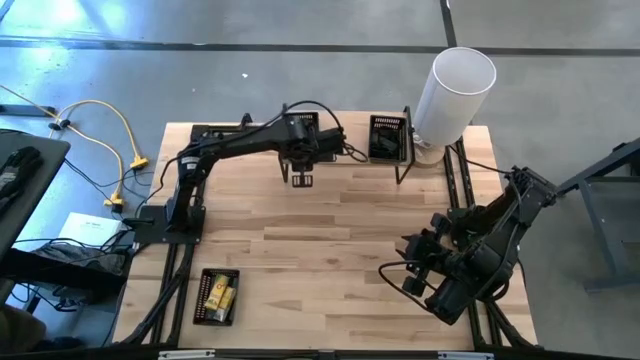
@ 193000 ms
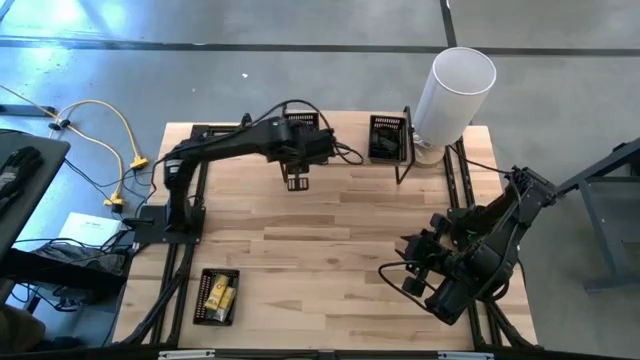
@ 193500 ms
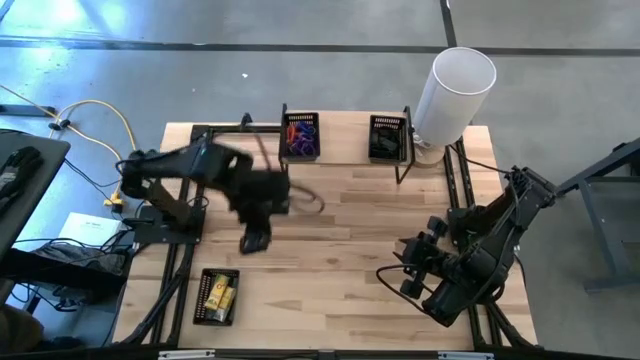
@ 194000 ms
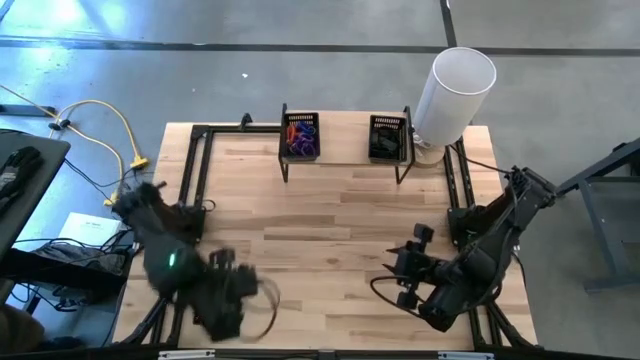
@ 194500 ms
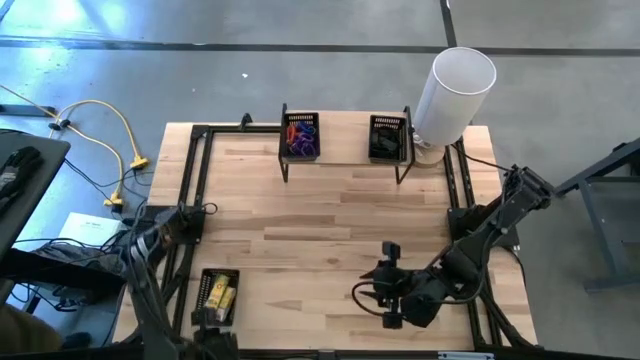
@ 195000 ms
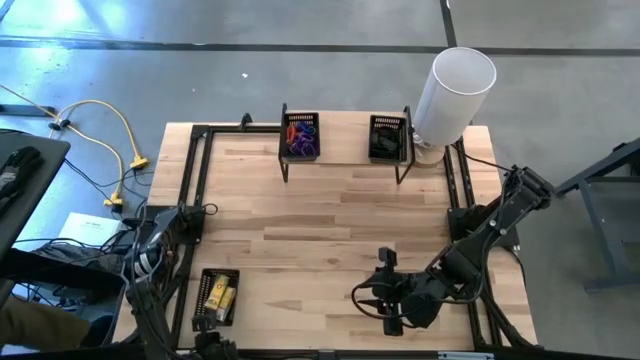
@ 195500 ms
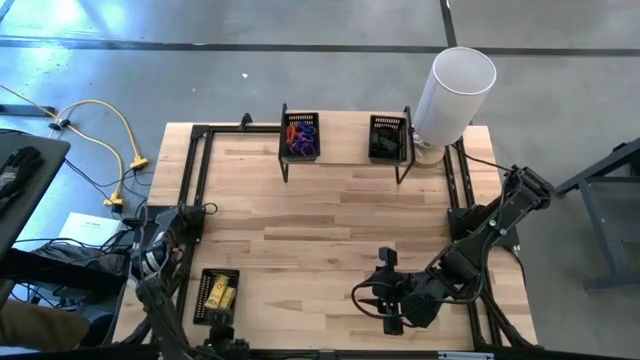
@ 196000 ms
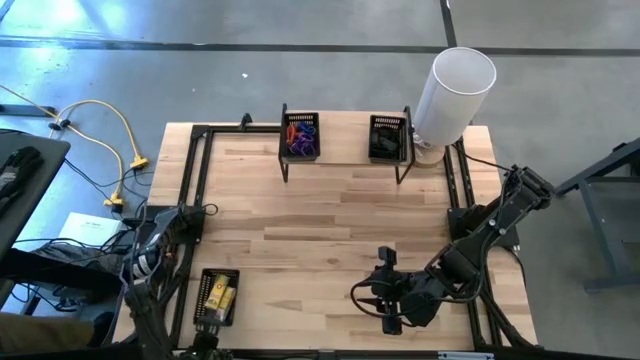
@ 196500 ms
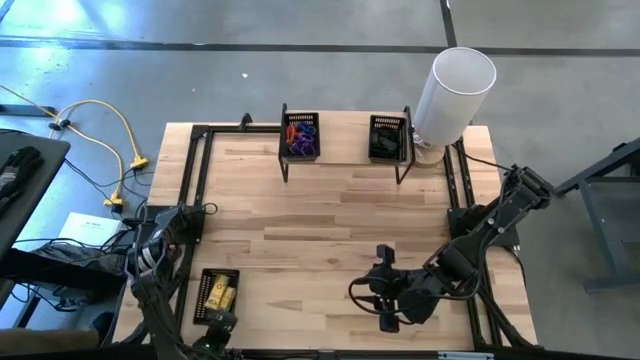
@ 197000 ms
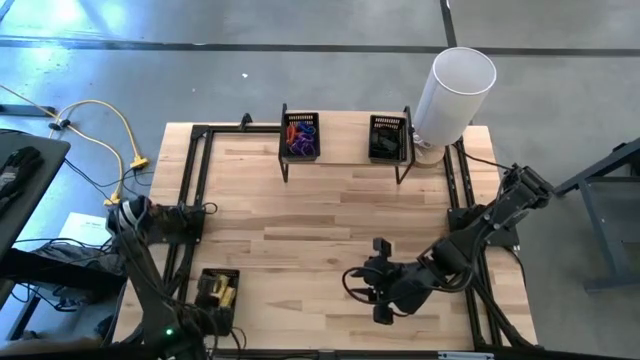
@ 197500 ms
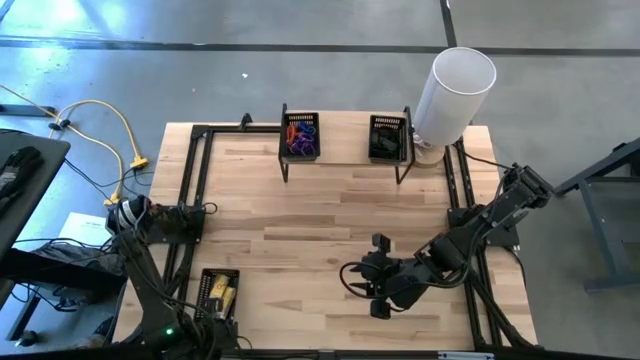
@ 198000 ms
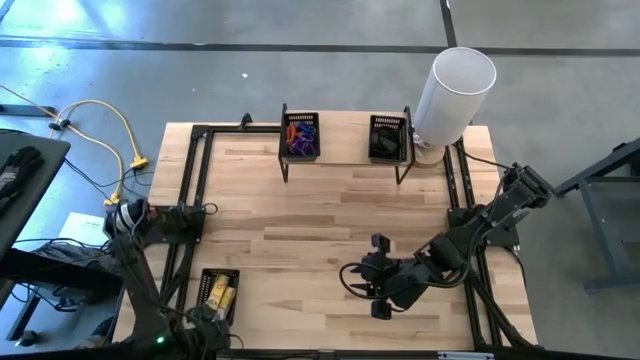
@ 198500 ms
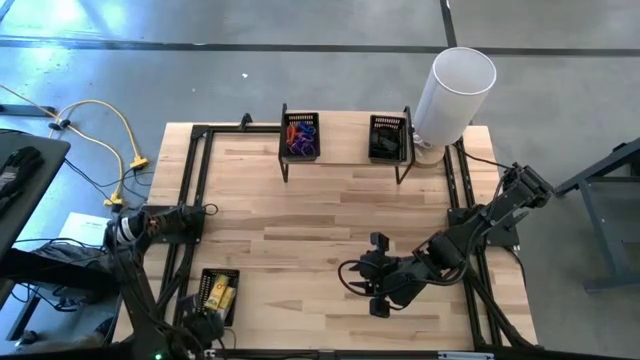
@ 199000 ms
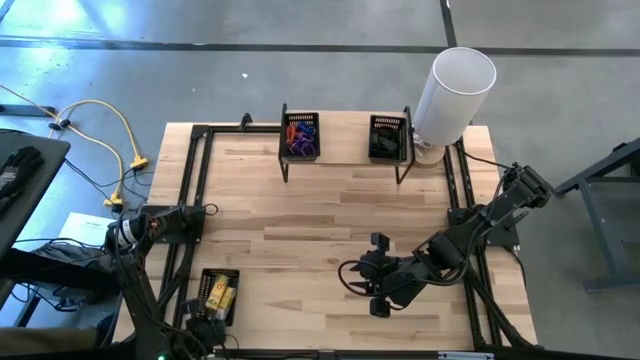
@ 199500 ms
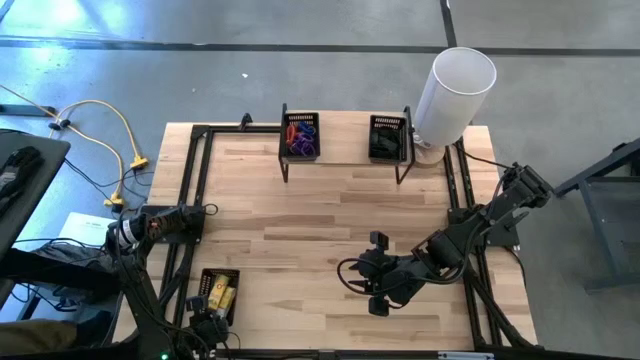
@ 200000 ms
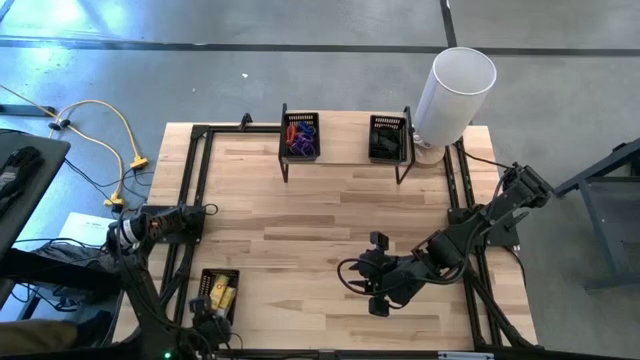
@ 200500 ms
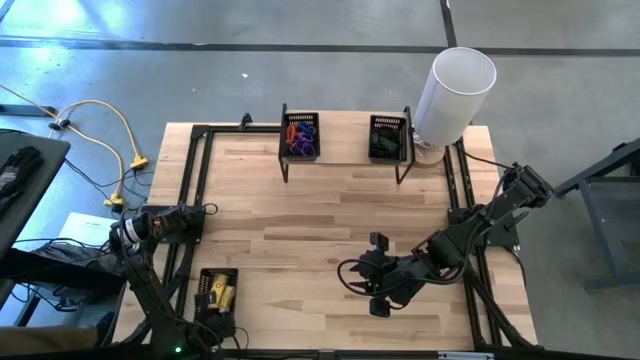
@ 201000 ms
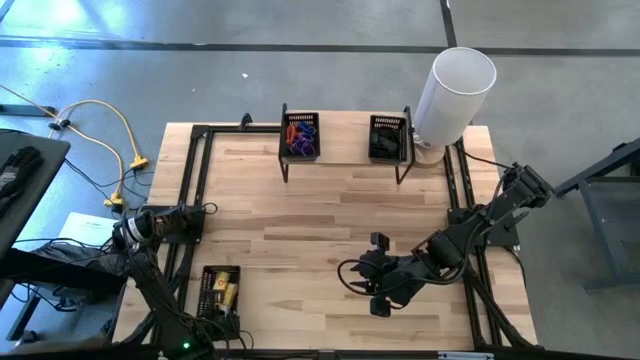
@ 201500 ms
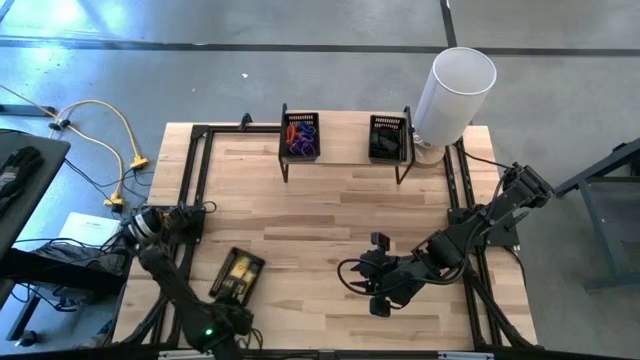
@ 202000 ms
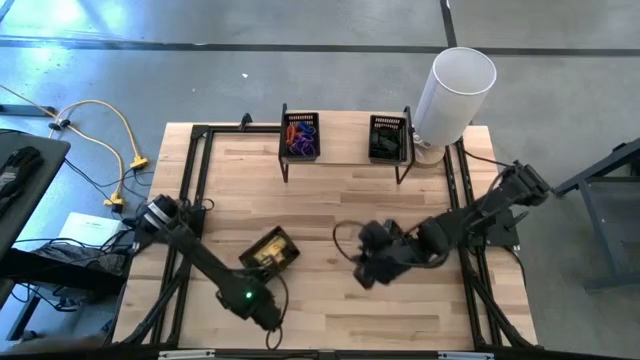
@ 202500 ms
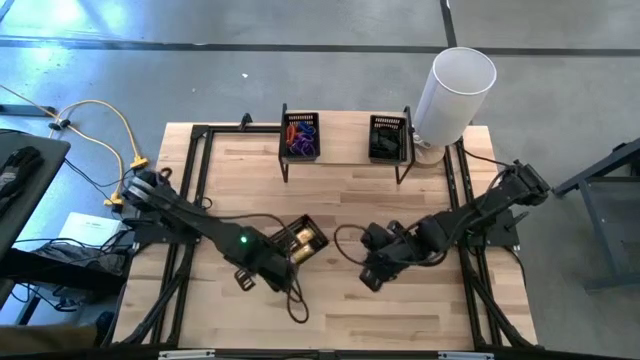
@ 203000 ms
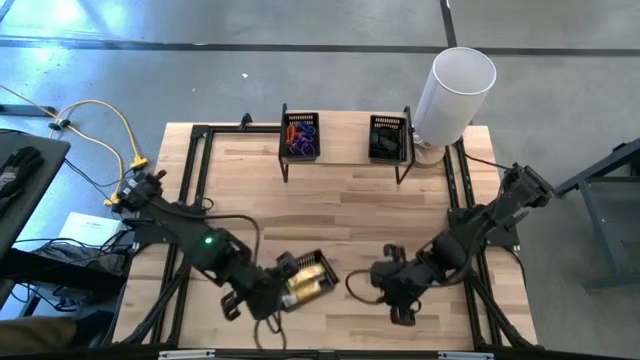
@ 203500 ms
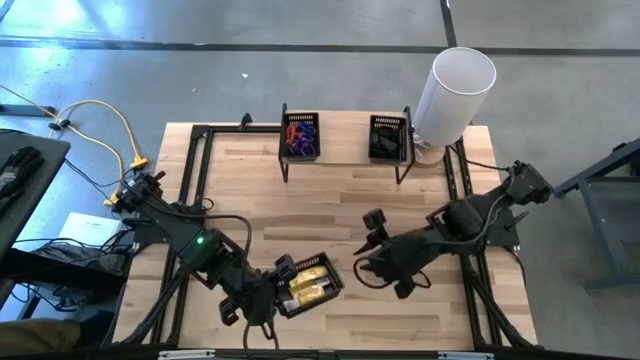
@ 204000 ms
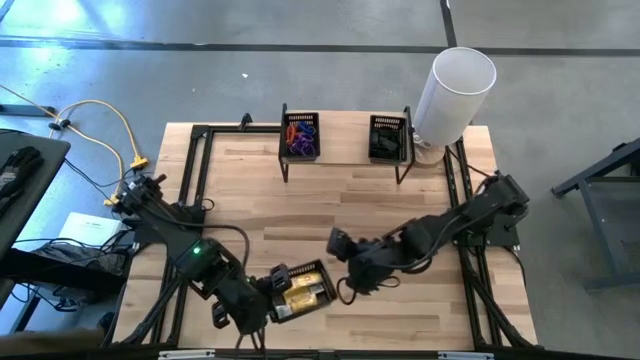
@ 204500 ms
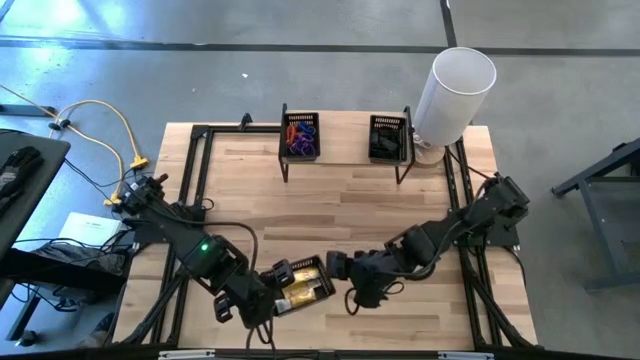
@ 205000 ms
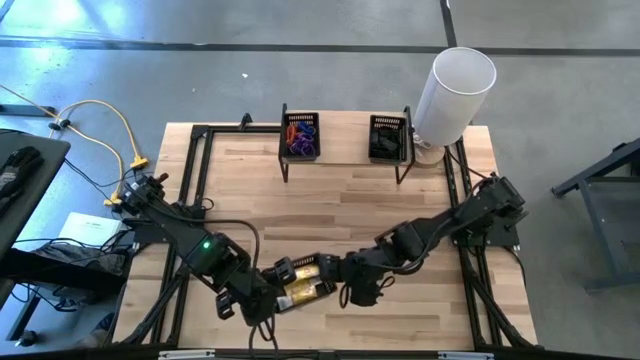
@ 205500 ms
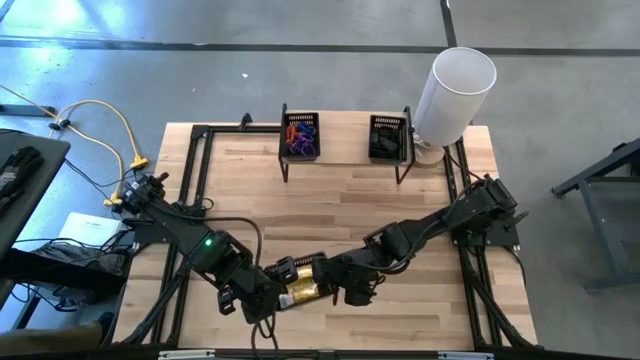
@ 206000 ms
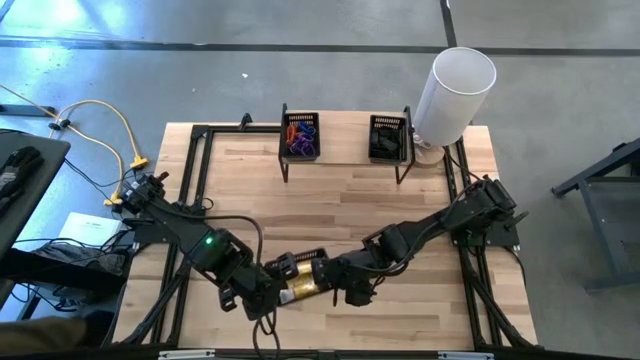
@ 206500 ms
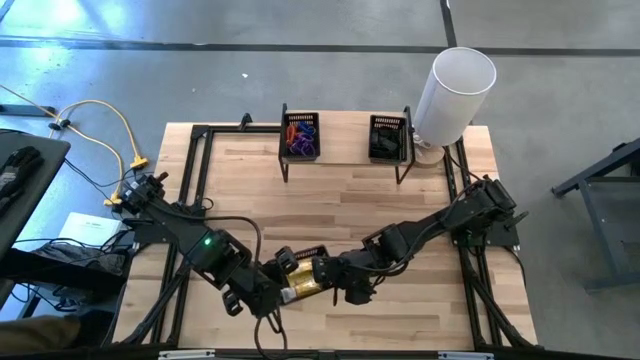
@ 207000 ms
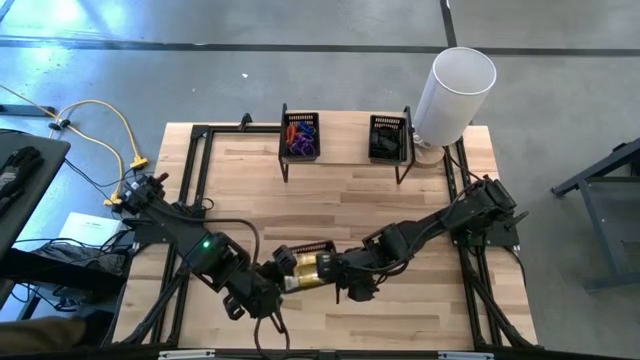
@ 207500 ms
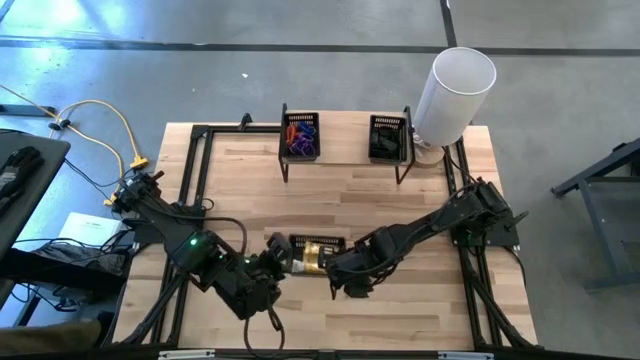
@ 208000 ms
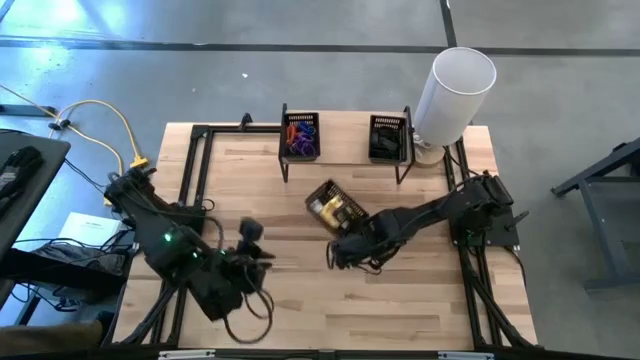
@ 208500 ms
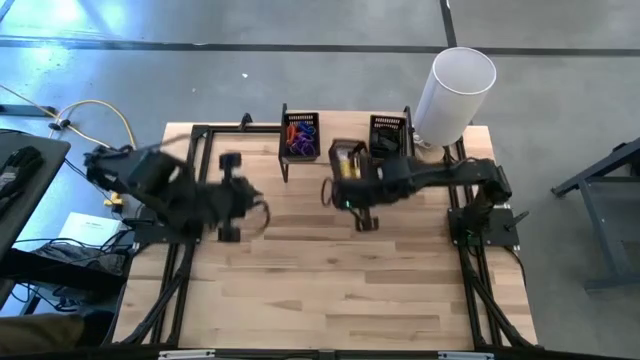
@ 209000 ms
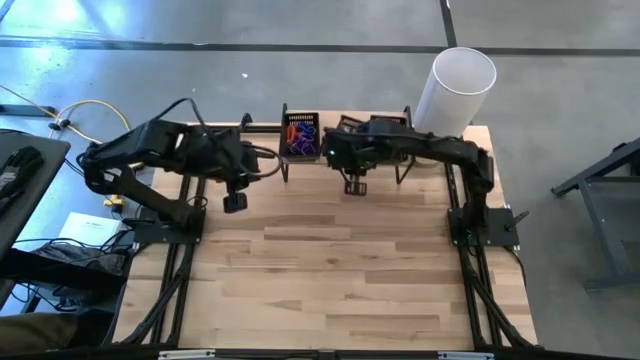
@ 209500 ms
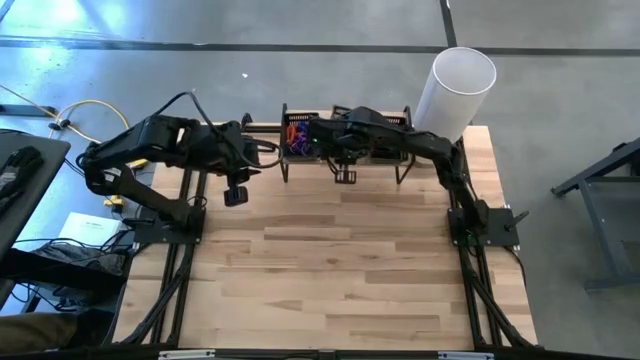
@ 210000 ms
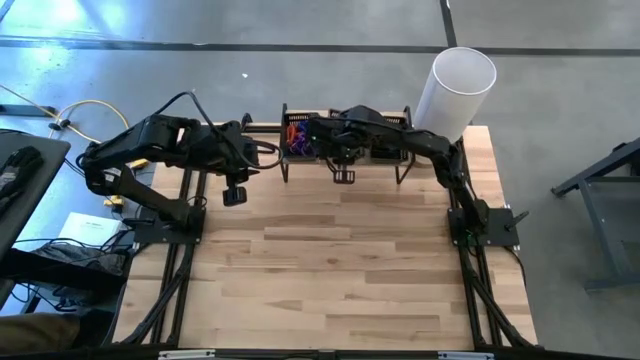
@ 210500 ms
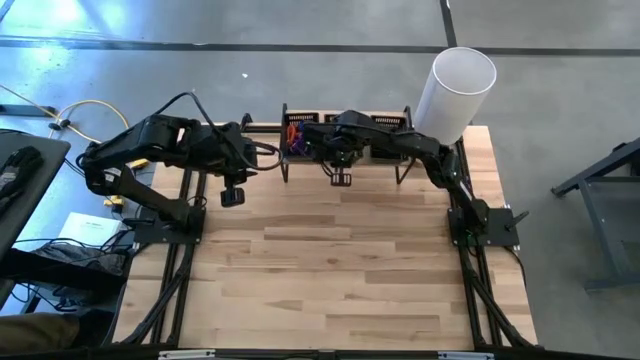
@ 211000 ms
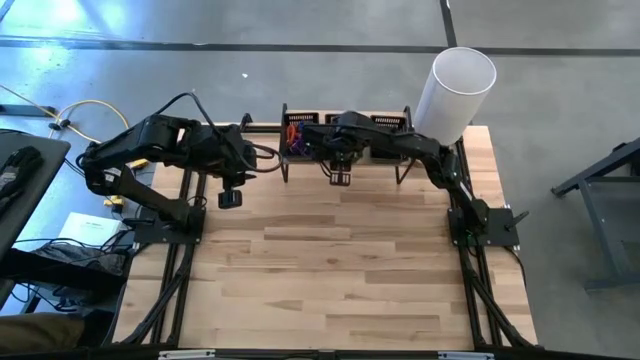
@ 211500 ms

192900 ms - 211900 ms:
Task: Pick & Place Office Desk Supplies
Put the black basket with the crayon boxes on the shelf

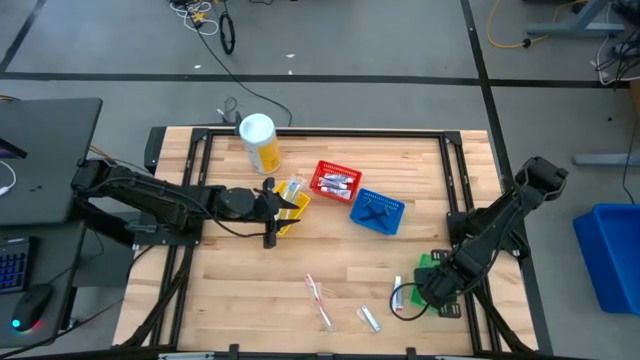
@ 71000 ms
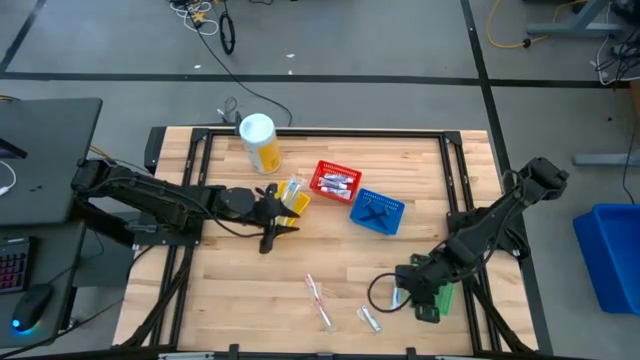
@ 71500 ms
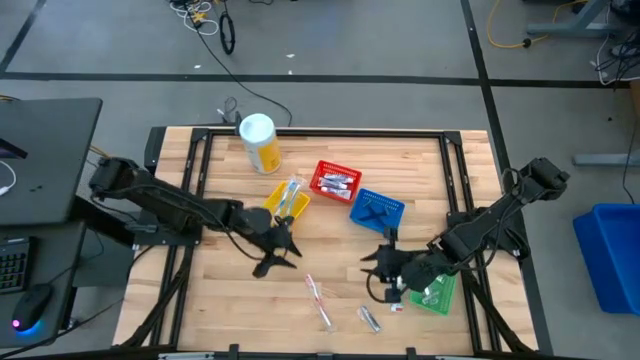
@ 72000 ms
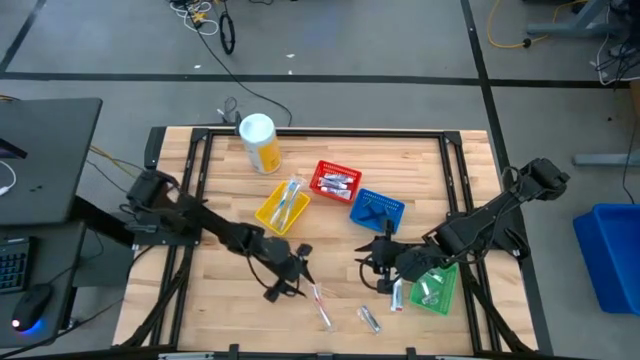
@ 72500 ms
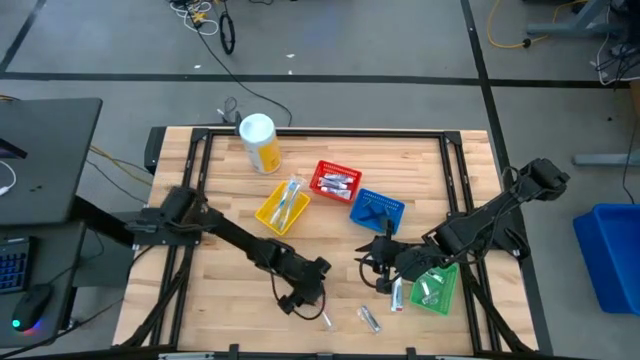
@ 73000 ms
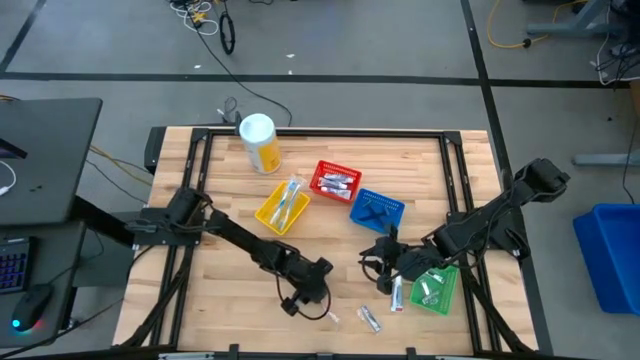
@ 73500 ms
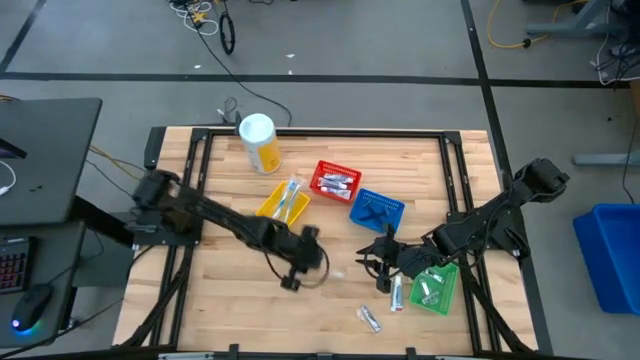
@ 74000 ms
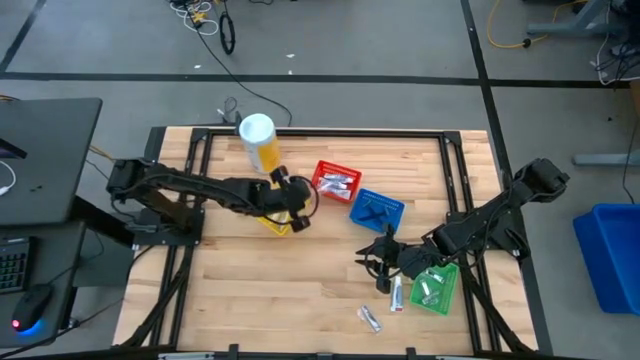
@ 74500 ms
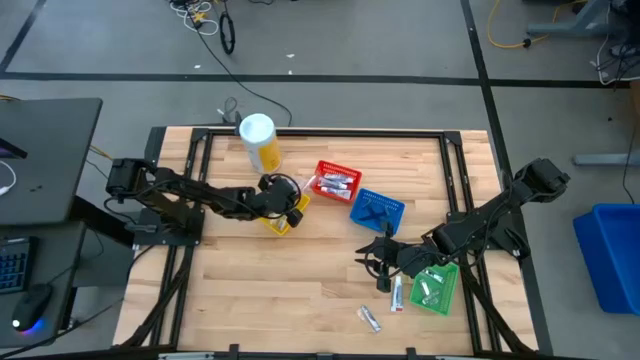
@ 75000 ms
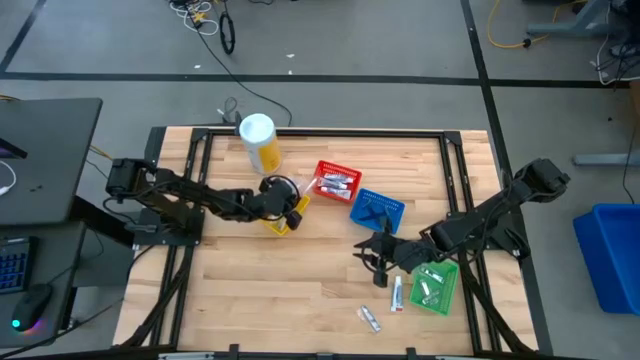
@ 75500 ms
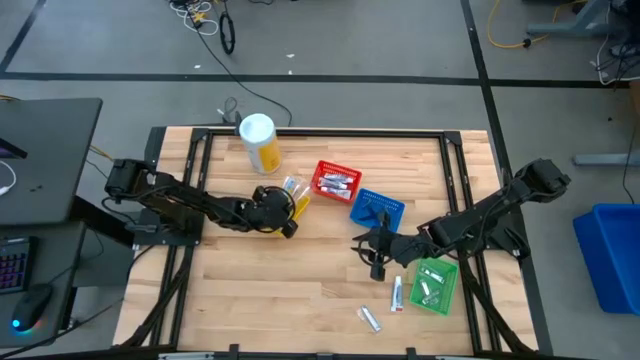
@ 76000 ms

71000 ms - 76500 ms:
Task: Pick & Place Travel size toiletries
Put the orange toothbrush into the yellow bin
